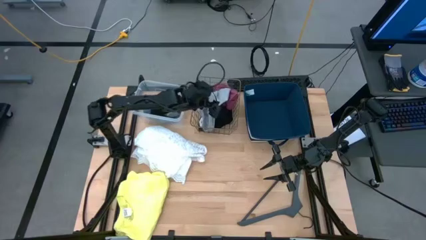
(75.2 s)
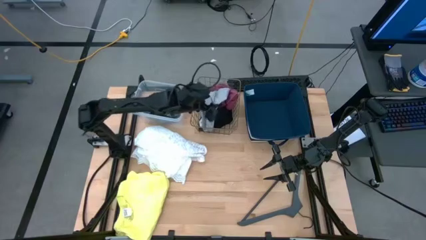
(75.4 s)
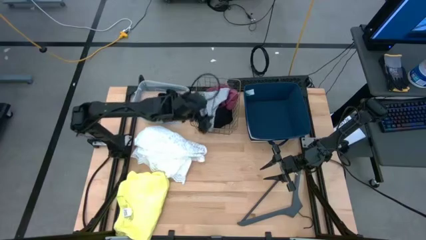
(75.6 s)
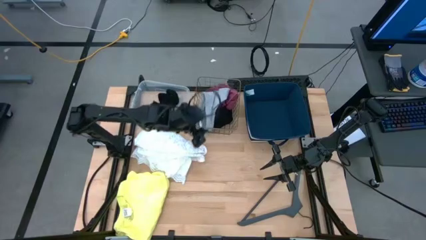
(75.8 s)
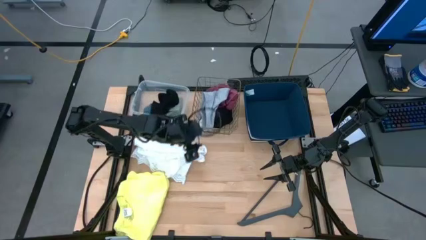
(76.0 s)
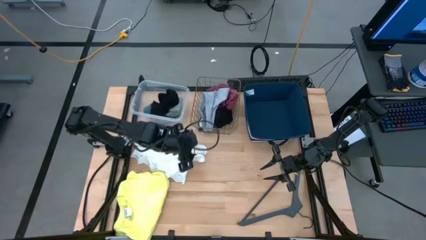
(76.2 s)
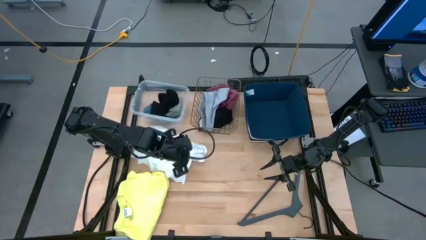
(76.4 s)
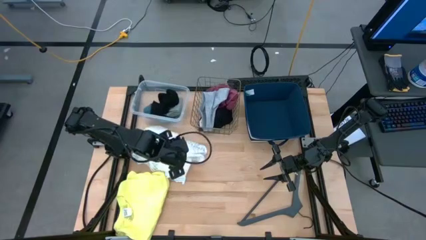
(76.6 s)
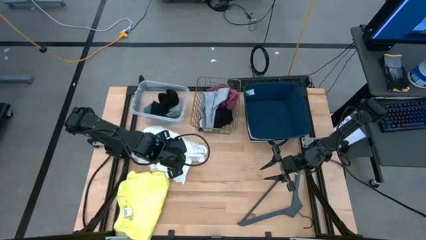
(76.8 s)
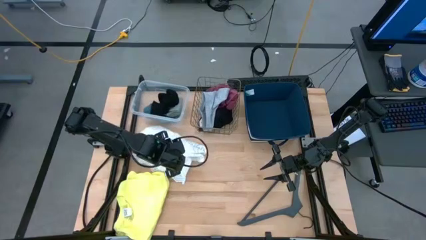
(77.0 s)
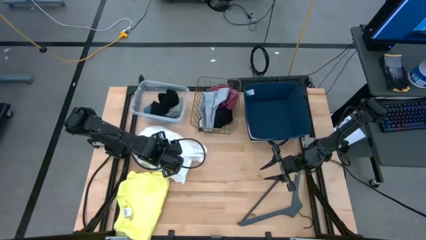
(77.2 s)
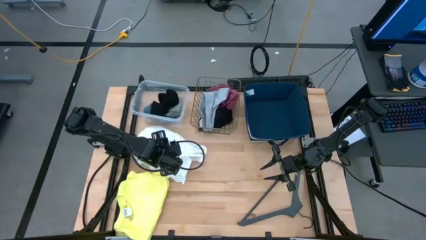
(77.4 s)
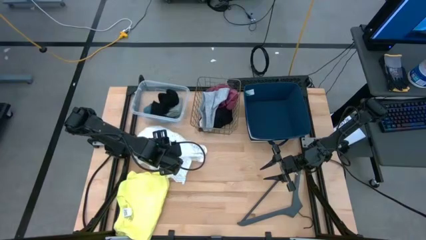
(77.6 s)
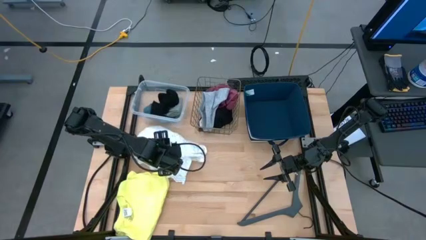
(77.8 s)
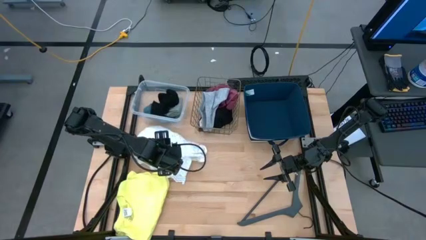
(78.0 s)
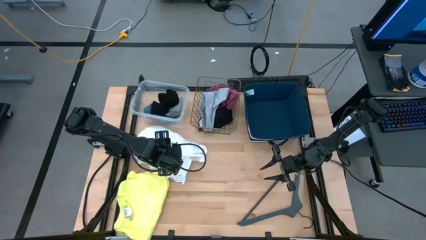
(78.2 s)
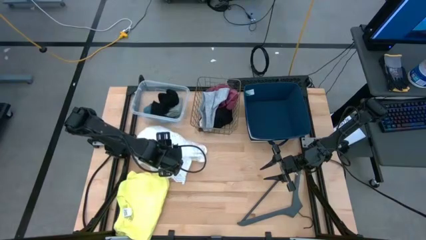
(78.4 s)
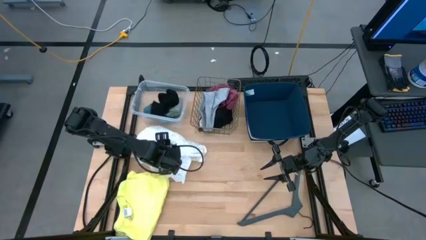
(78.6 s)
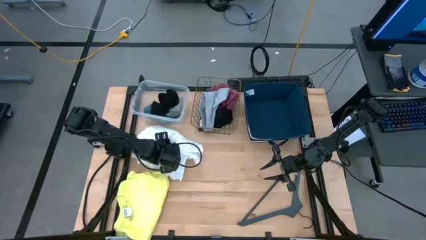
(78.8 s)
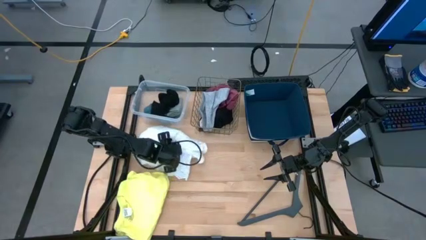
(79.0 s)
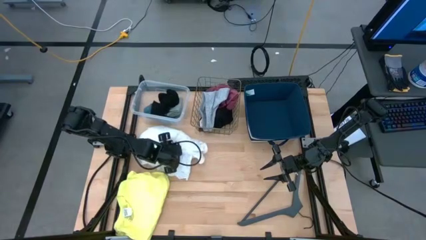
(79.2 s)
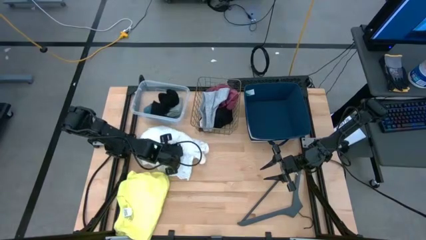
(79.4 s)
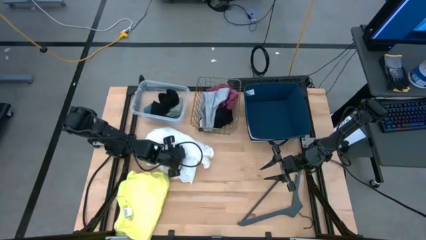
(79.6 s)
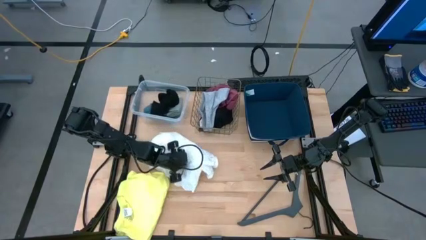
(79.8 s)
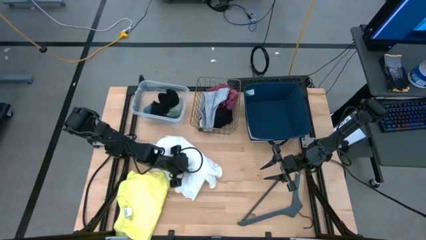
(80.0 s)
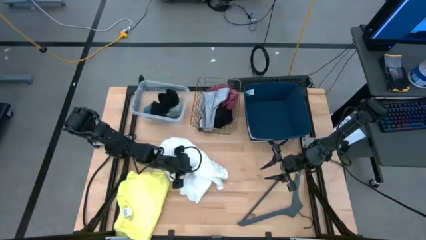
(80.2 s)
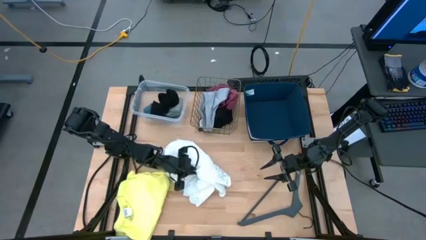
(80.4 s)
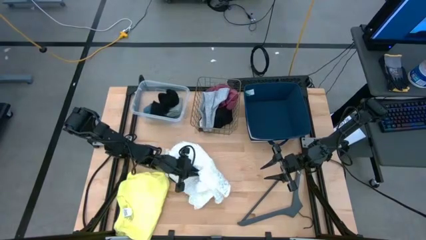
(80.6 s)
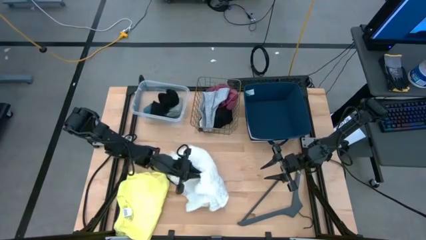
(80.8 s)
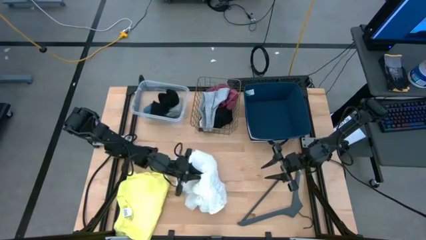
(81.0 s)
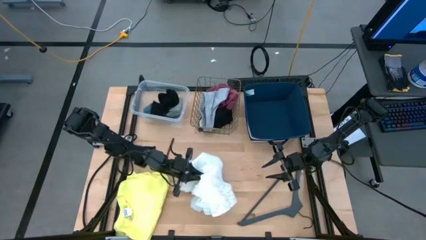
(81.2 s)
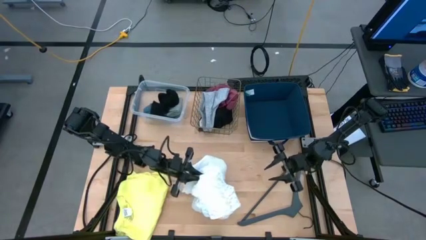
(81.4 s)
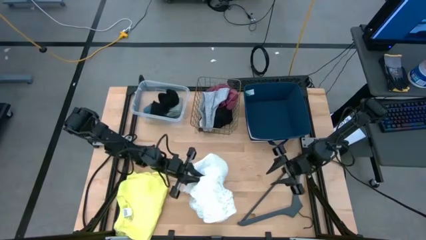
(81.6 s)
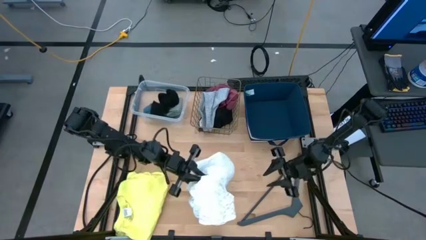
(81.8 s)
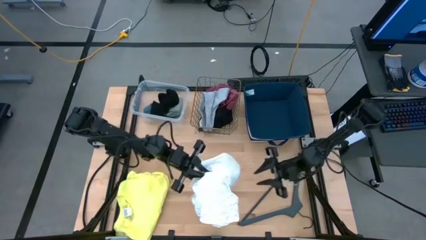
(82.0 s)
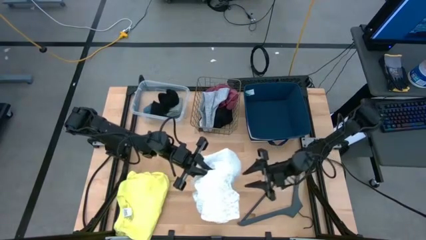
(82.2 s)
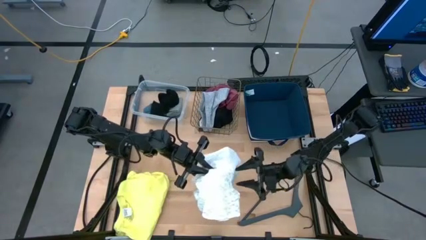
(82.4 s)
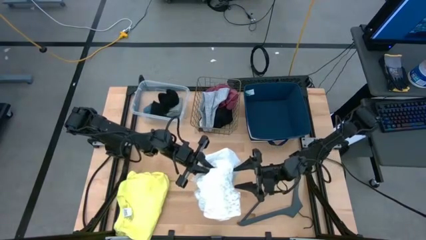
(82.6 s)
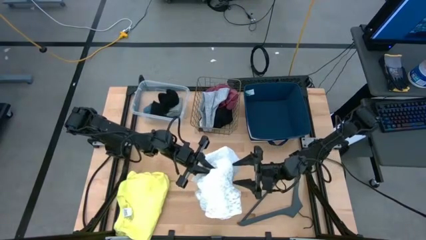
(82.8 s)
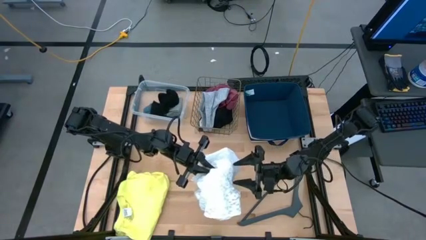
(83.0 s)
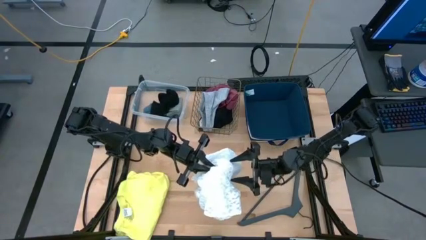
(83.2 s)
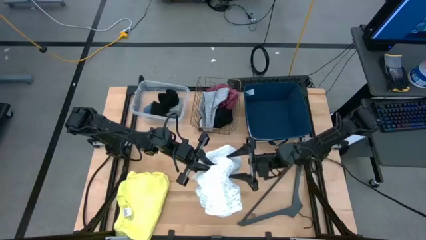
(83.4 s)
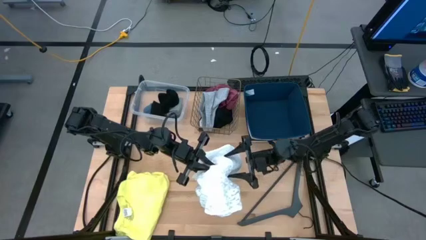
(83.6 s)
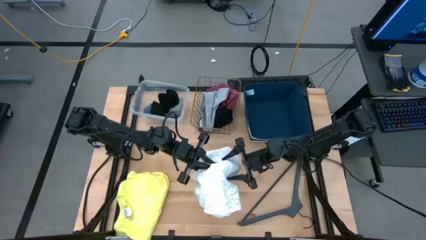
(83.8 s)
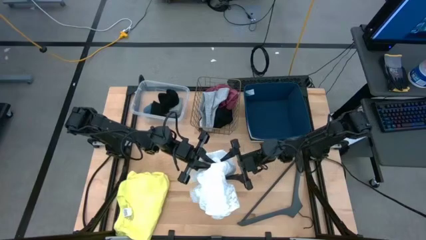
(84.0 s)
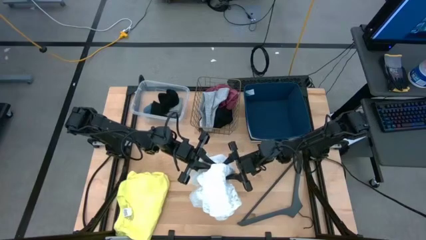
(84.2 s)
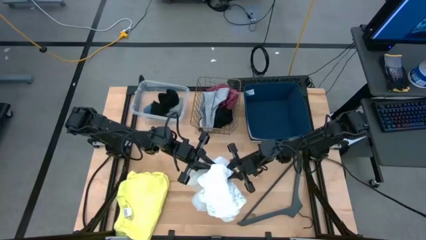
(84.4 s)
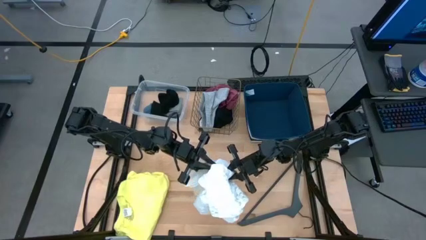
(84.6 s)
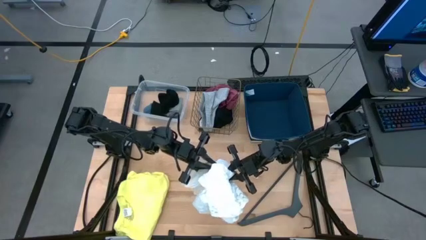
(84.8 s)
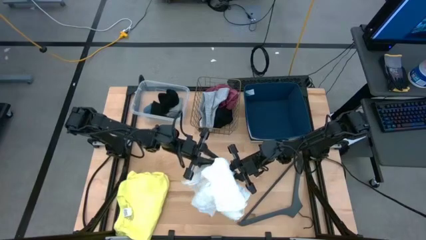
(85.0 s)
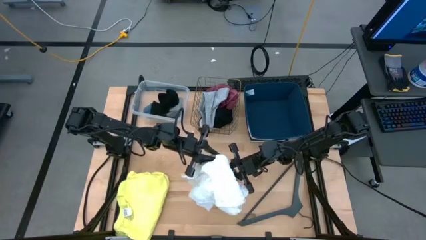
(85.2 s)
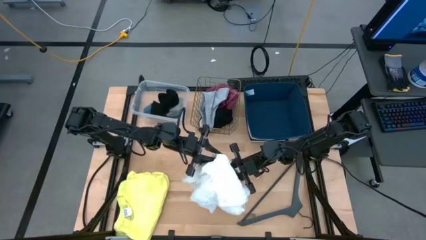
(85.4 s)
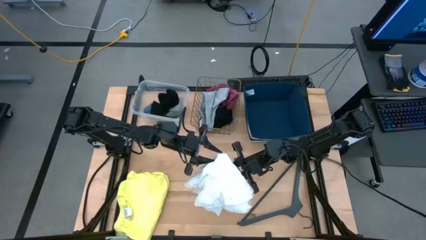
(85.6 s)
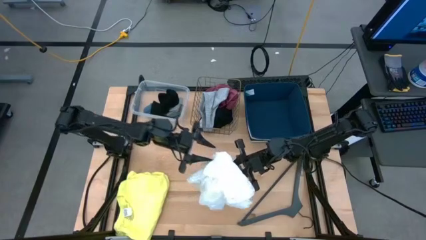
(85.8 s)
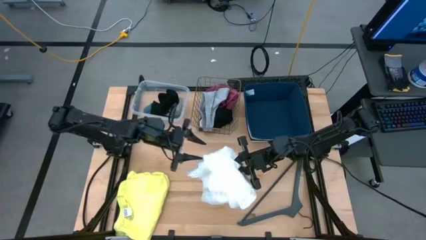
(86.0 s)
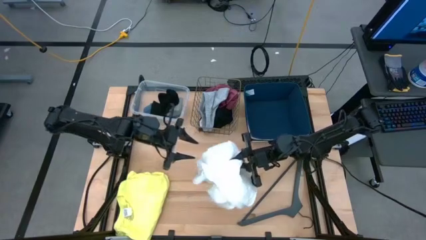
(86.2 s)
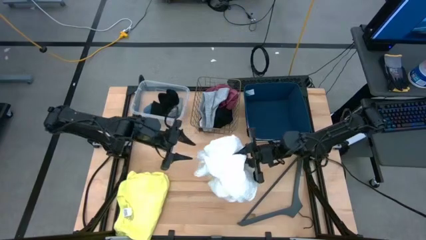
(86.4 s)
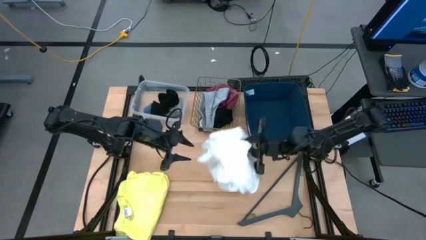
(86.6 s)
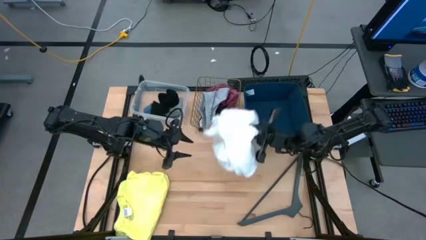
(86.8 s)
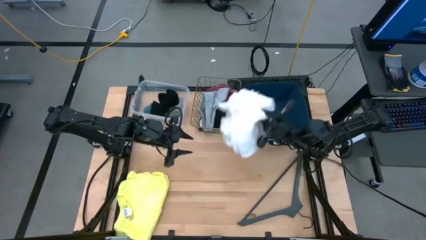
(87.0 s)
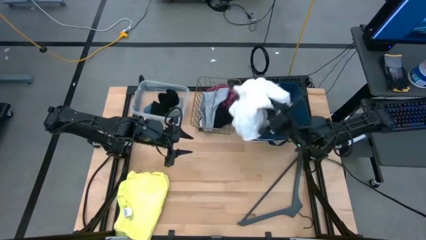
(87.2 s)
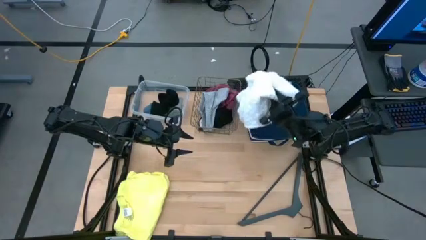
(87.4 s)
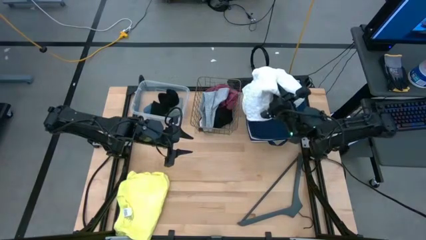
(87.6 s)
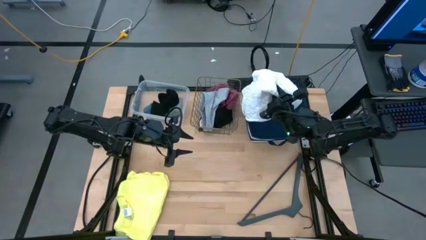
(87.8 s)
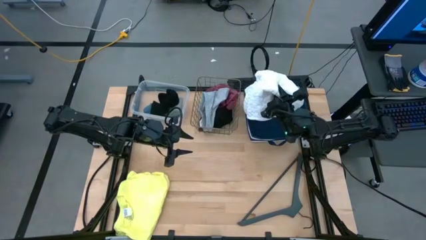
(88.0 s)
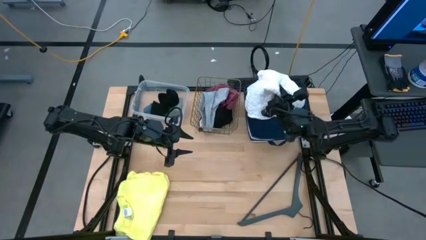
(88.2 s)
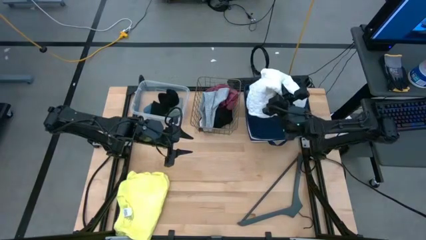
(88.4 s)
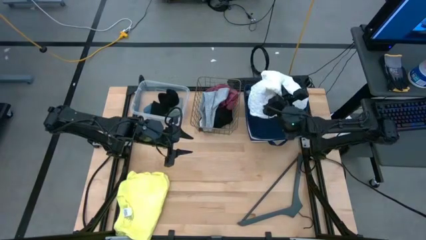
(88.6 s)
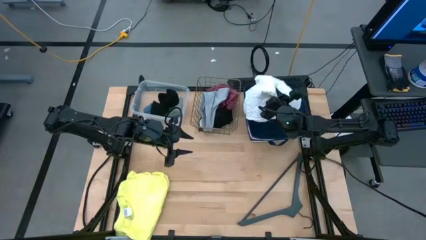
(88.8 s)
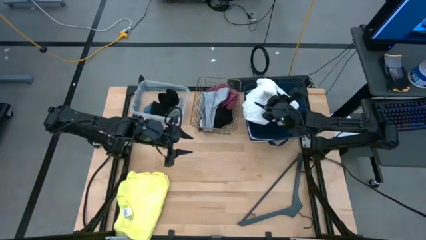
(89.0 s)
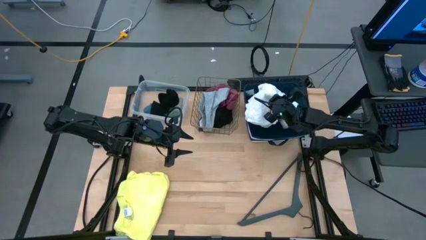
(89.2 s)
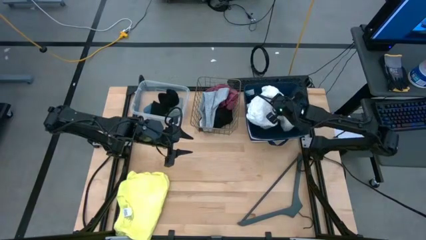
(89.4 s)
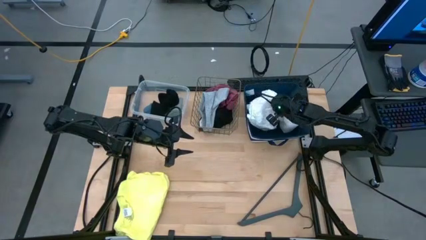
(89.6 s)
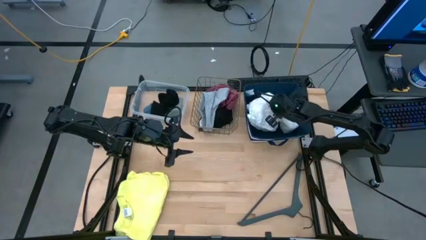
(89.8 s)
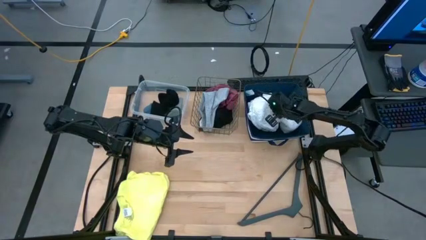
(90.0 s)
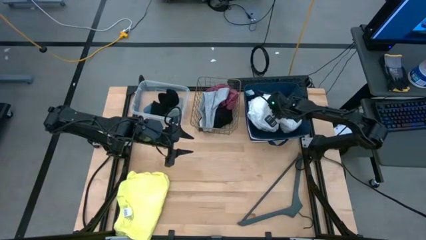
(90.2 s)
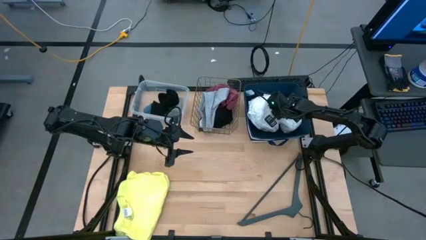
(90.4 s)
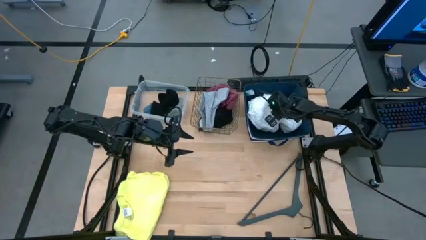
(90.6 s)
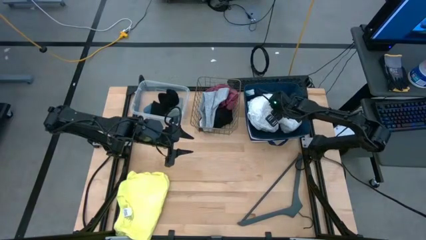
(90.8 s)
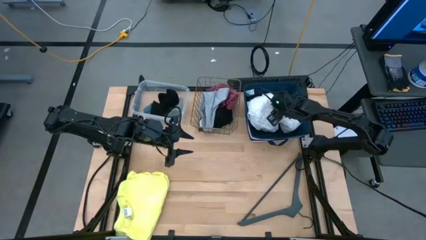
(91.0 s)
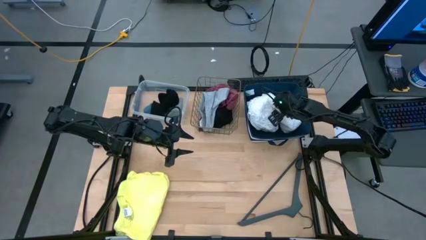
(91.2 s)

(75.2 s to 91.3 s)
Task: Pick & Place Cloths
Put the white shirt into the blue laundry organizer
